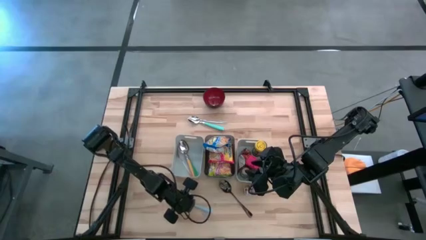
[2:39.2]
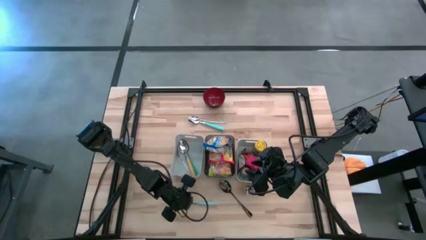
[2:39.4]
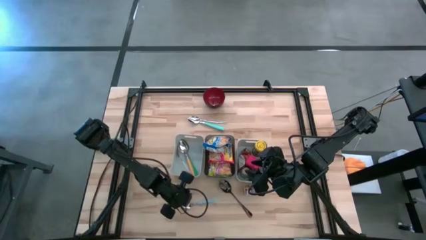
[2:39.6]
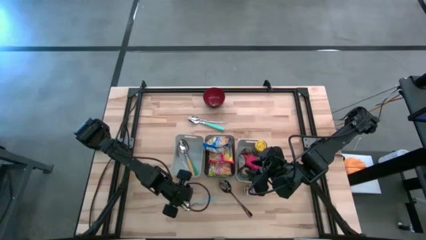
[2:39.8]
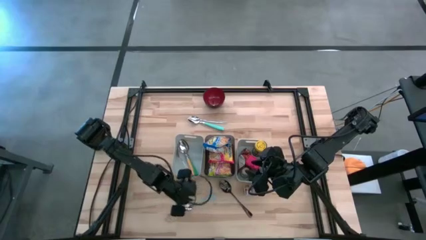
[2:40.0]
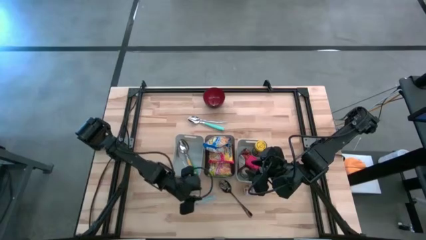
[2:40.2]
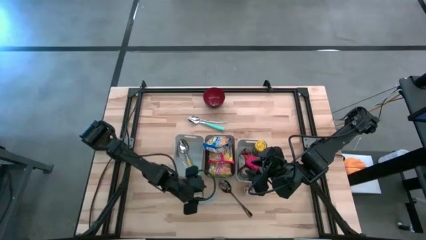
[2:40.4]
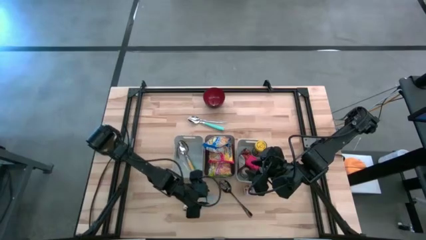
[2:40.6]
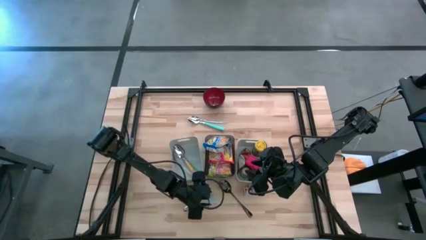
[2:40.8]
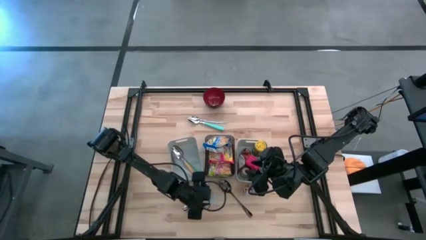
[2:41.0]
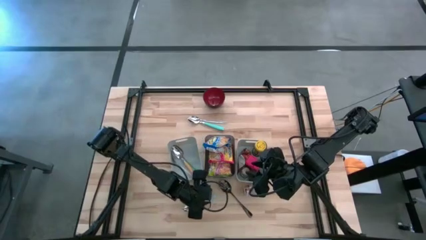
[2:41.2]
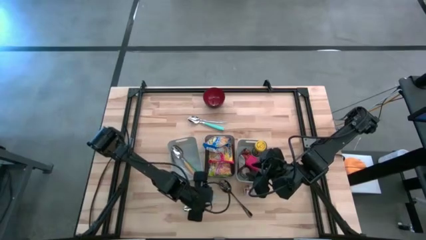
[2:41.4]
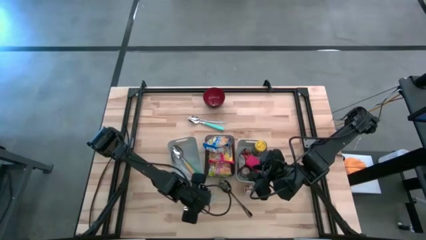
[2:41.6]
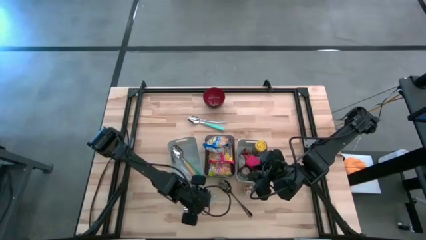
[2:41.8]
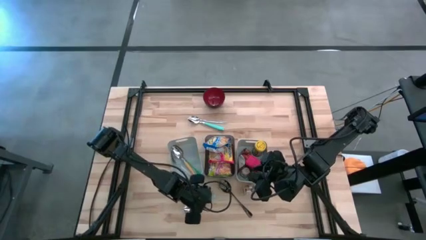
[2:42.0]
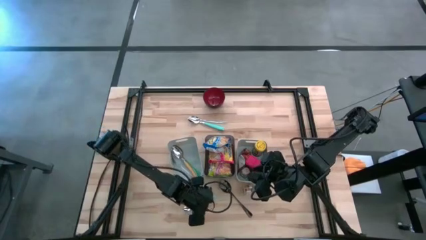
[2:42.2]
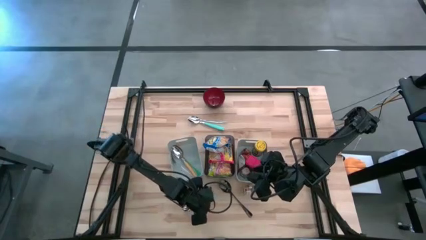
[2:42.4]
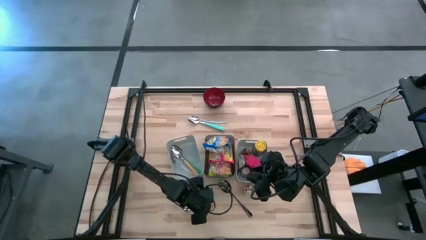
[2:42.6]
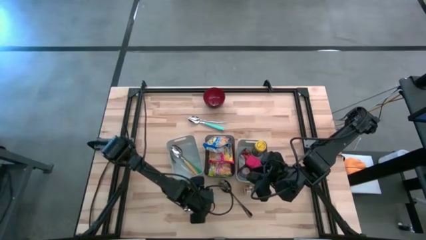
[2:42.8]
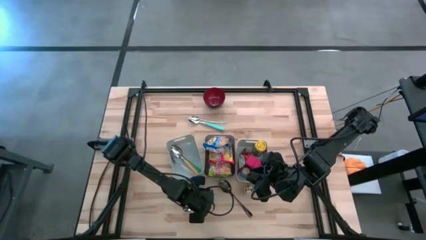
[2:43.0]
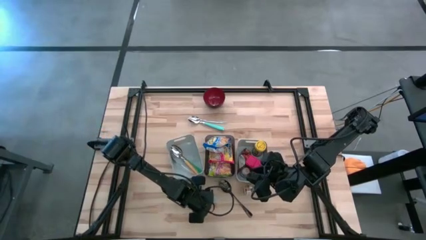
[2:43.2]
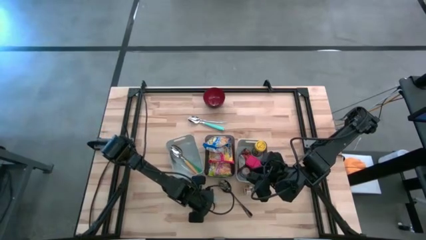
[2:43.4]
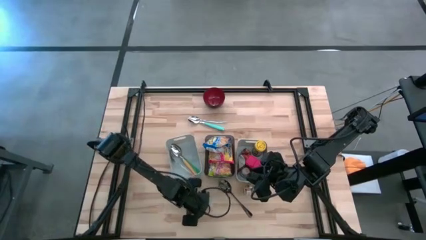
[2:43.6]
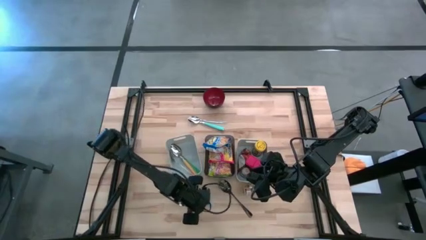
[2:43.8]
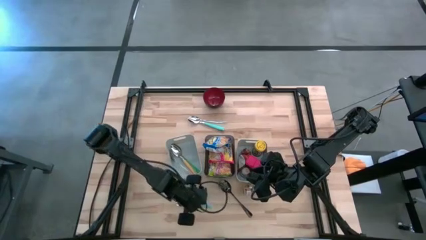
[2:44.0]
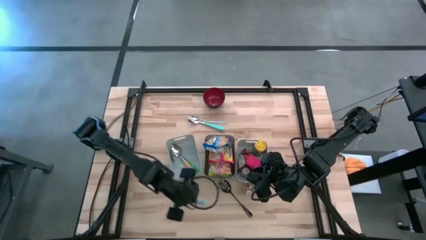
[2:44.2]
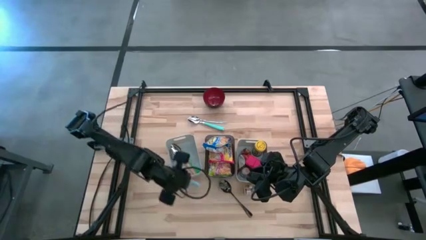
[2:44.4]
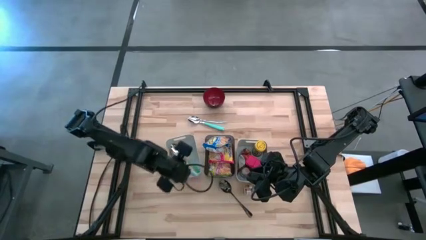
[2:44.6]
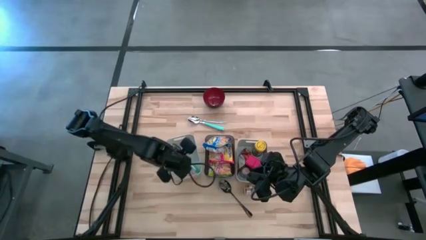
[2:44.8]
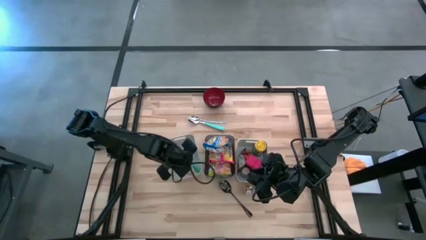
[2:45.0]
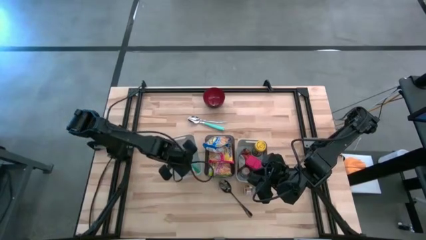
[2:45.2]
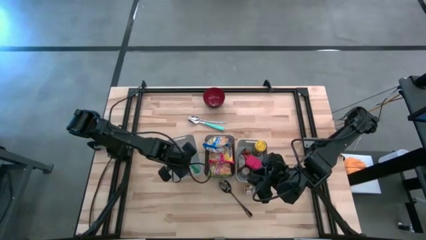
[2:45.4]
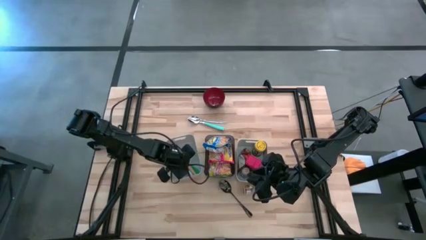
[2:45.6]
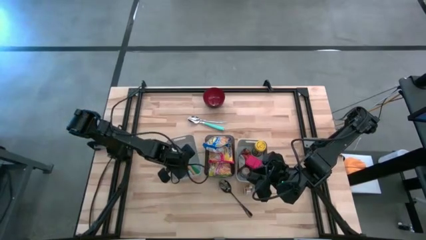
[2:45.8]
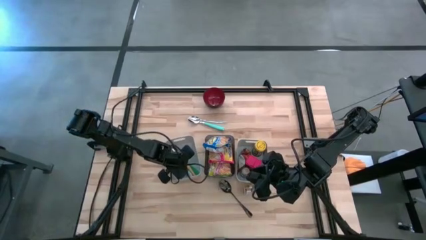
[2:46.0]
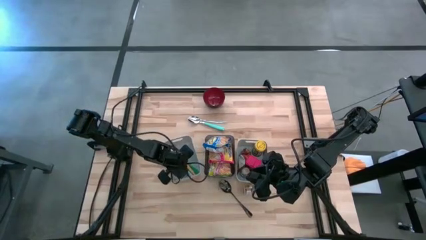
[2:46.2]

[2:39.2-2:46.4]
Put the light blue spoon into the left gray bin

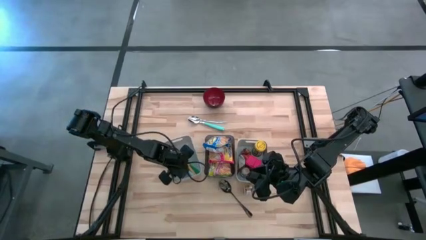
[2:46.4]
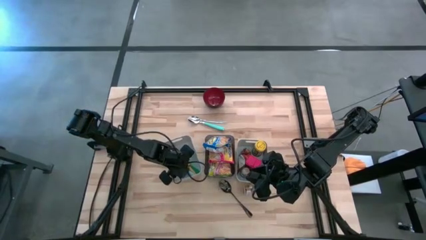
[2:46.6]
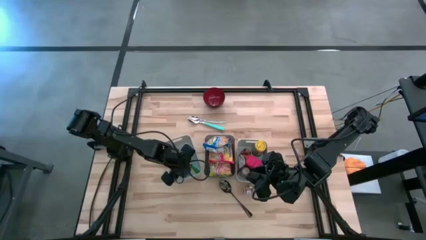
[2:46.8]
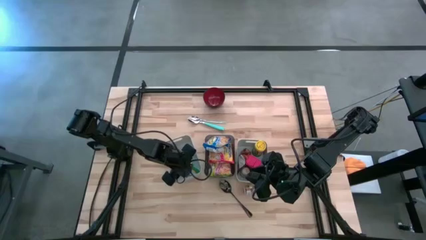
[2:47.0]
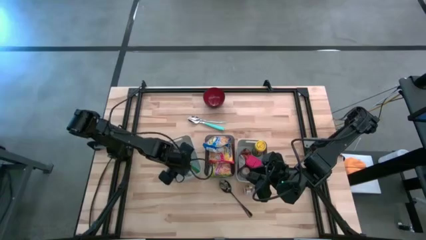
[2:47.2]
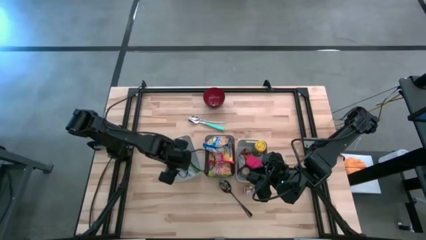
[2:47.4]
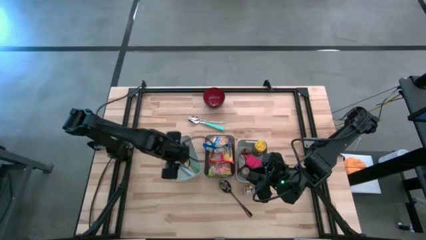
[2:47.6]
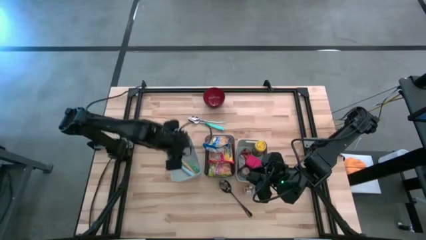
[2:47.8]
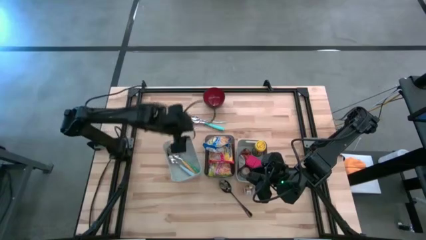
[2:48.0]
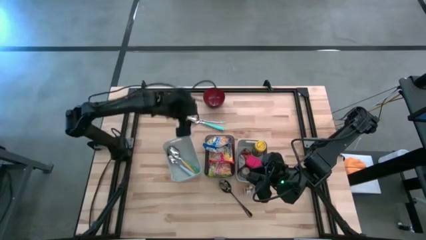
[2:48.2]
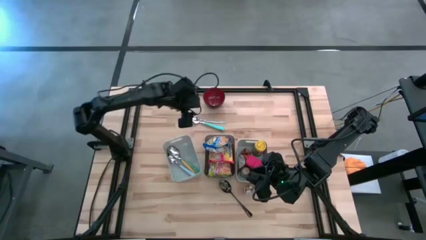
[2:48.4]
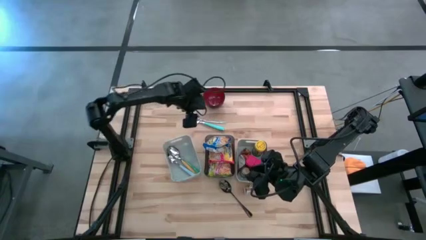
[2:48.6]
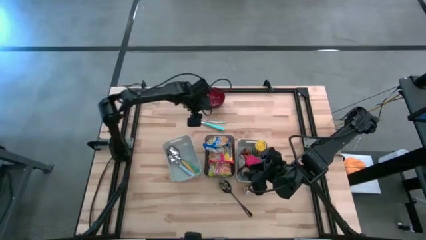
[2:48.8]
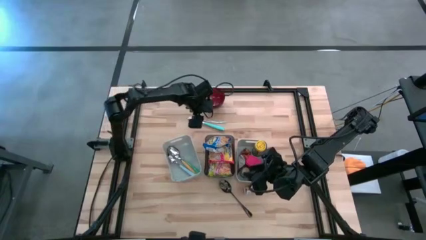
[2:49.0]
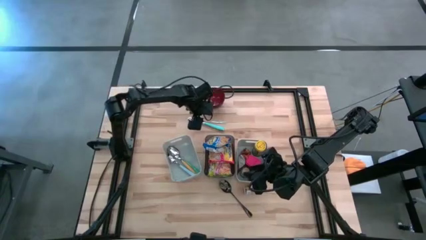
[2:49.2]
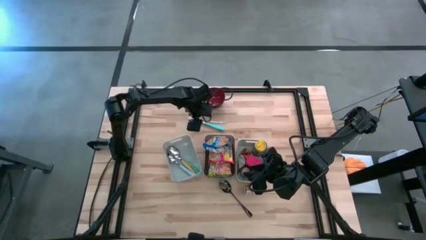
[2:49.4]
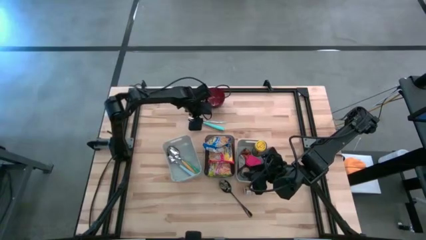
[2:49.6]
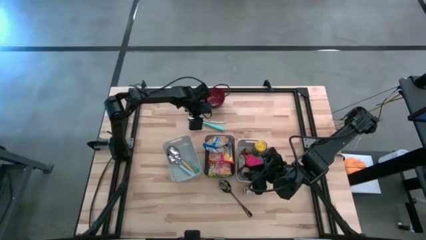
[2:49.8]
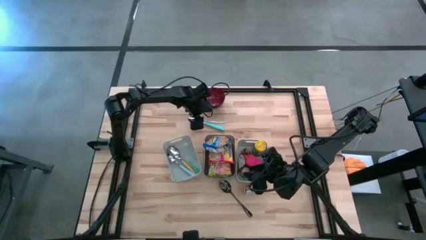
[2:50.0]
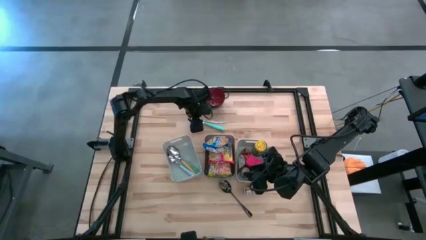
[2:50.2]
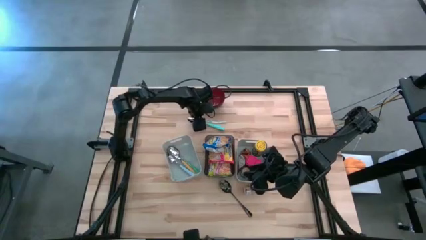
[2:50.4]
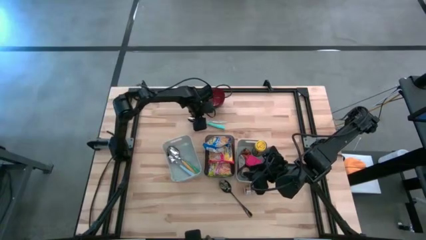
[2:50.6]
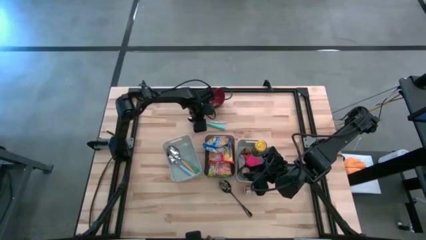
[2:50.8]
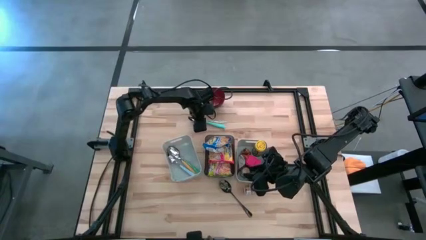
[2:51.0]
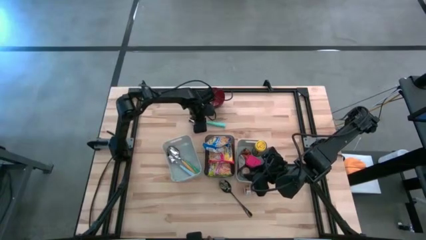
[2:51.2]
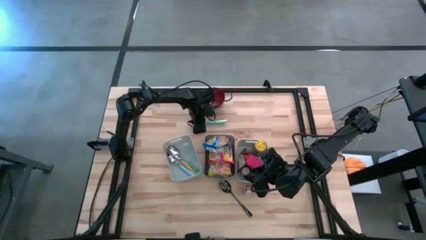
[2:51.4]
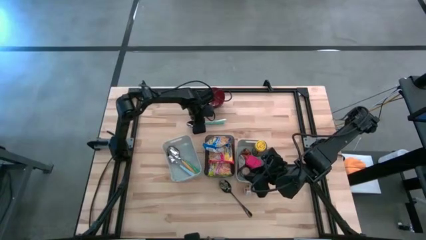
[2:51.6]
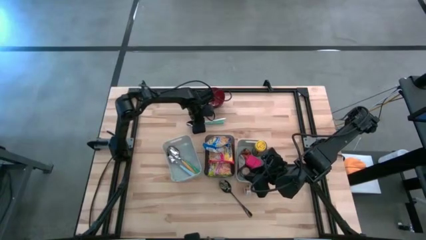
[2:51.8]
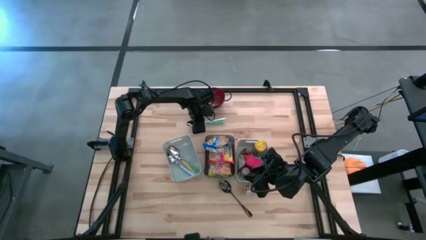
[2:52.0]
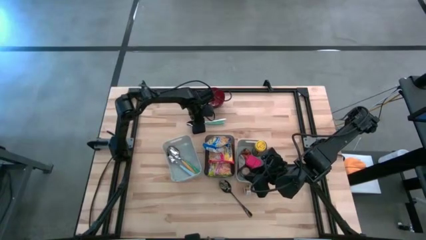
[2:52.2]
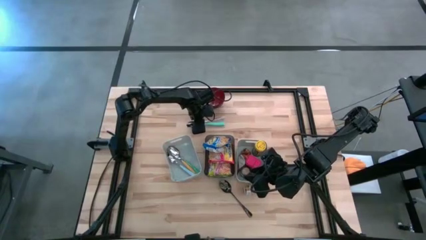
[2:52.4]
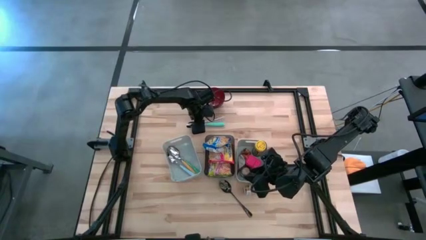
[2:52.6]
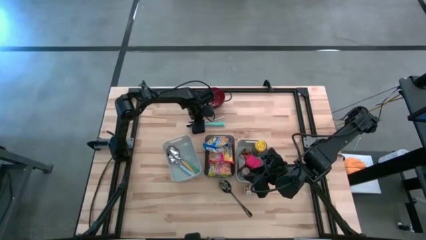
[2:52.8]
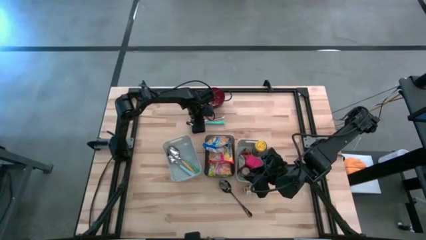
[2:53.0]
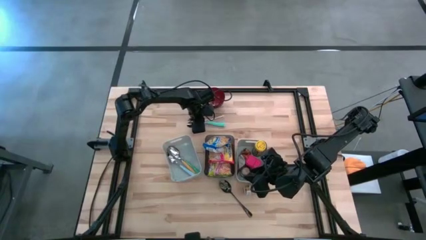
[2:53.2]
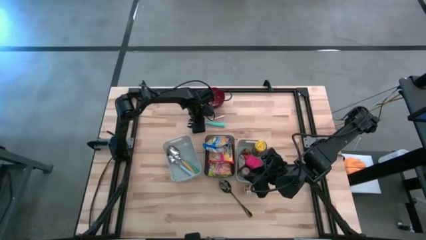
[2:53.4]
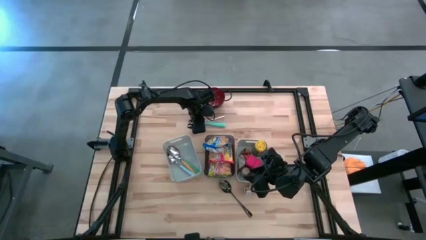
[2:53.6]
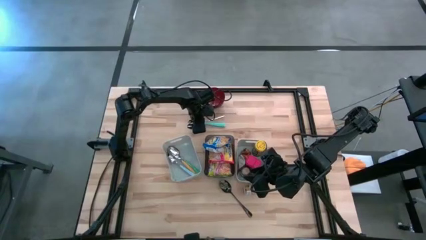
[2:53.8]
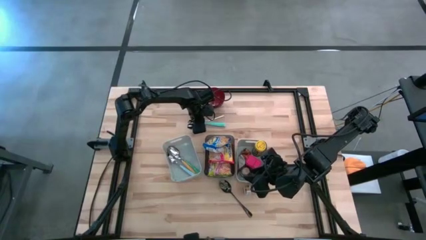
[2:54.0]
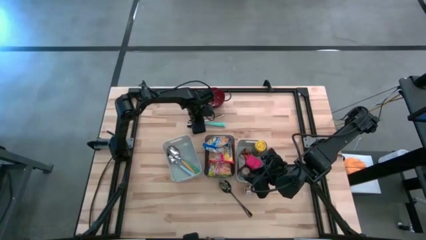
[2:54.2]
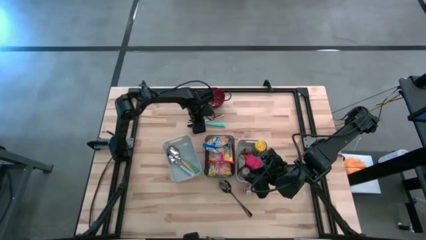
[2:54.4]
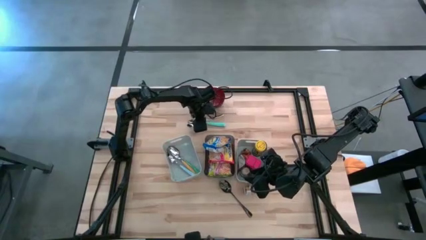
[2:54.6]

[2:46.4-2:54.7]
Put the silver spoon into the left gray bin
